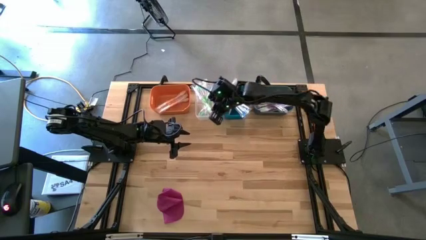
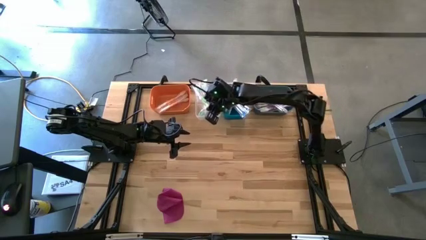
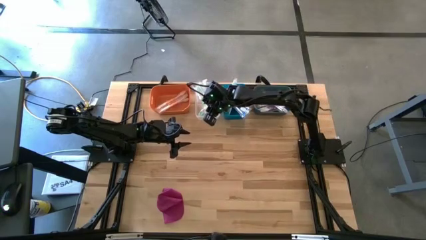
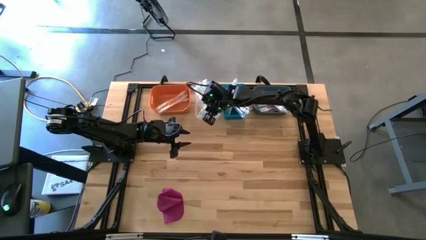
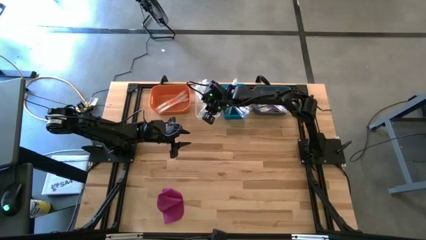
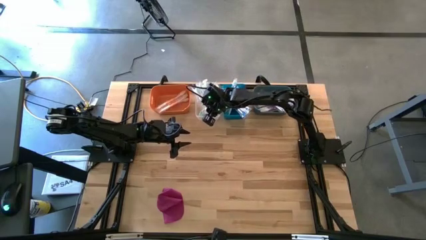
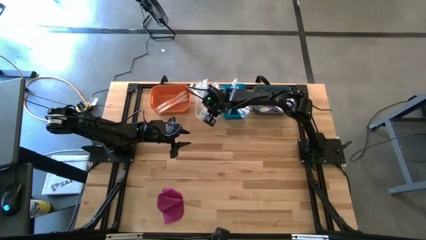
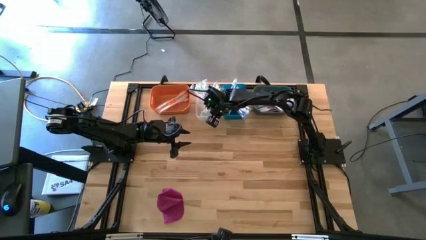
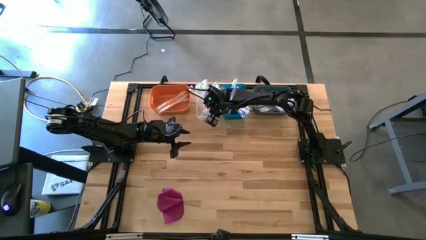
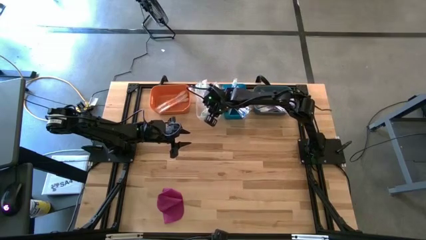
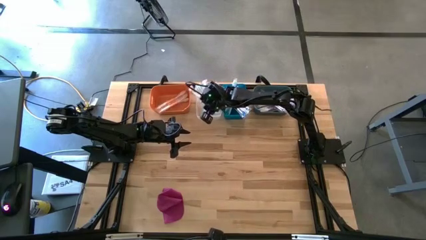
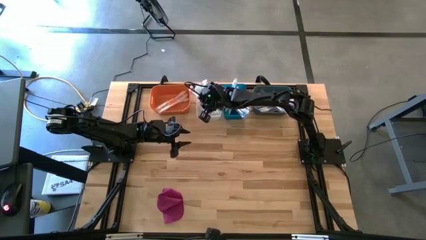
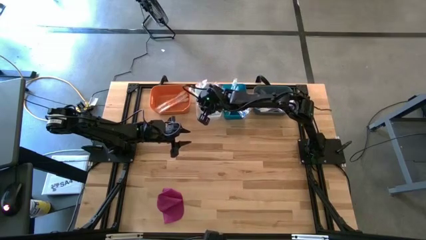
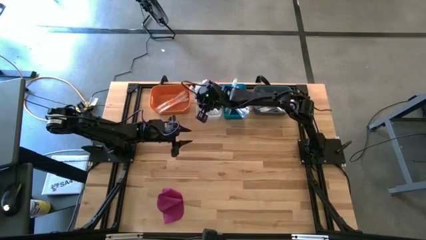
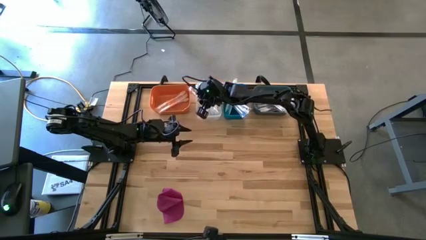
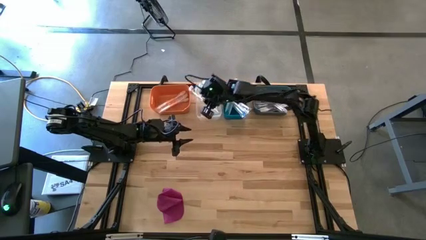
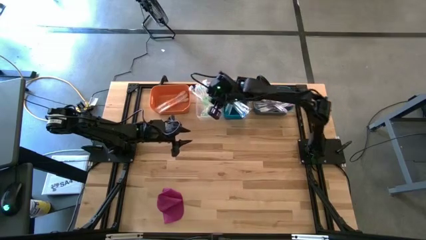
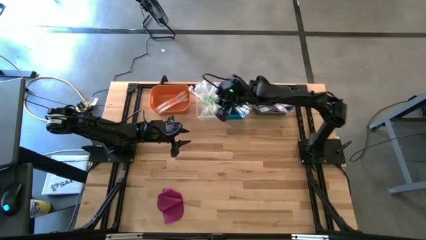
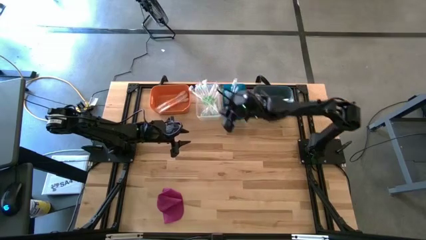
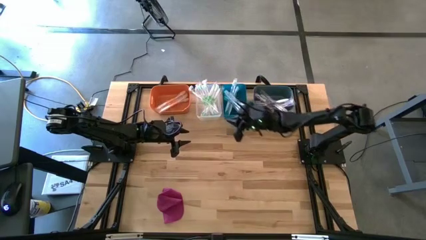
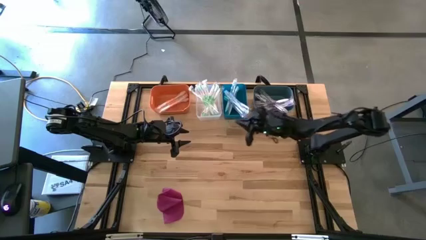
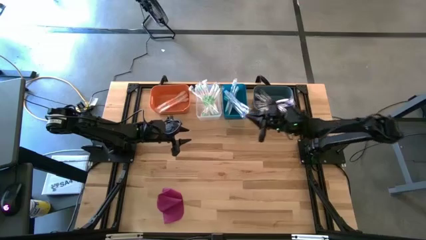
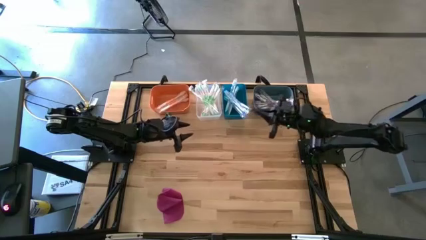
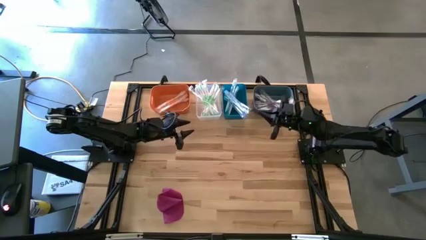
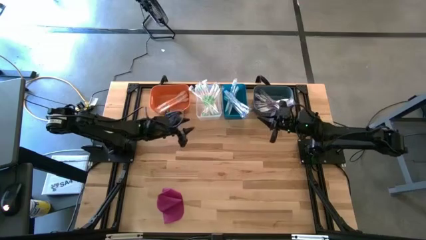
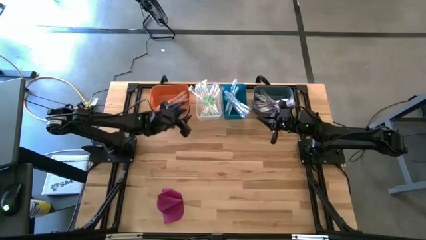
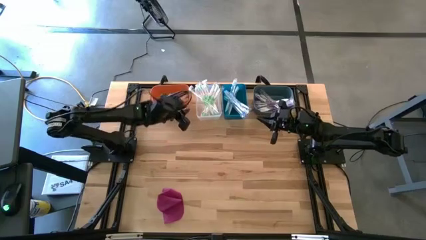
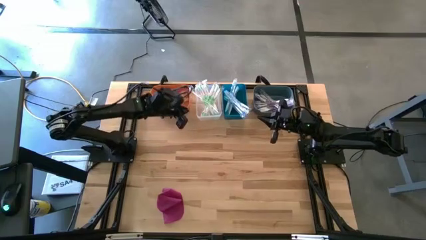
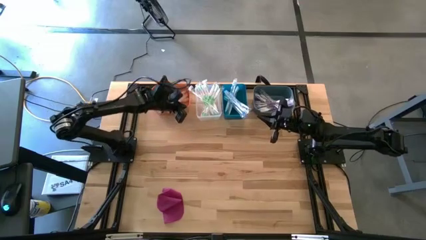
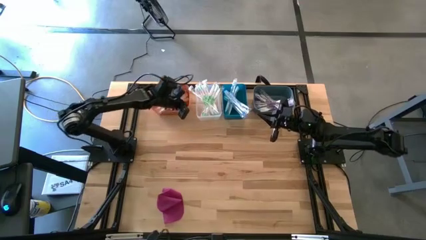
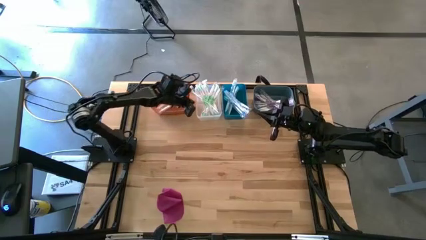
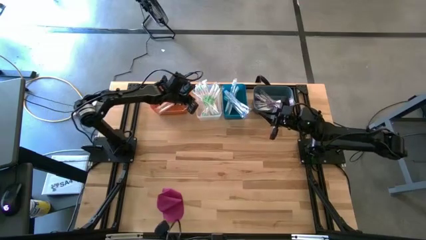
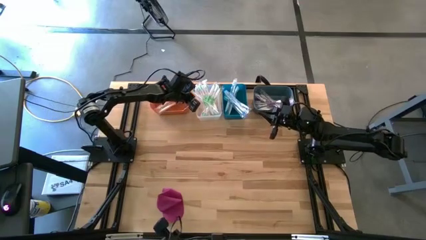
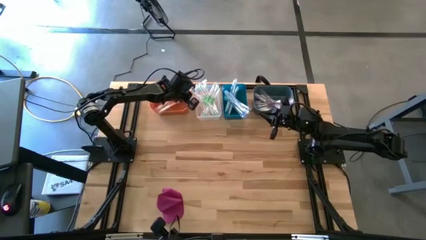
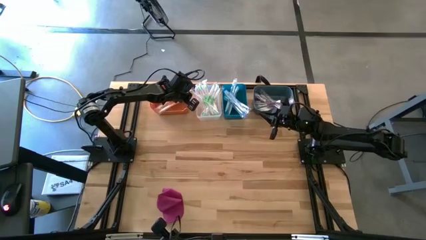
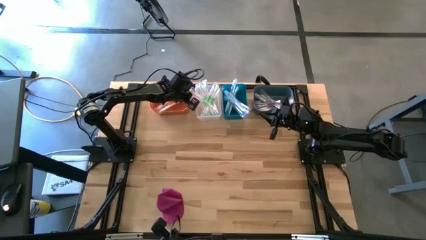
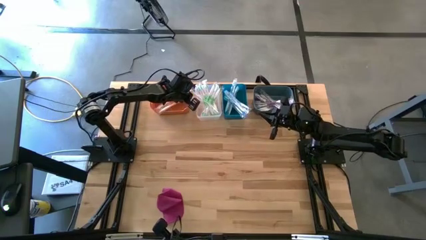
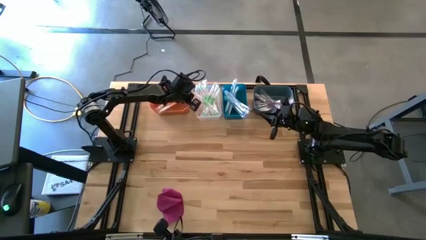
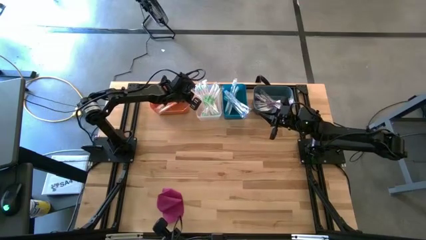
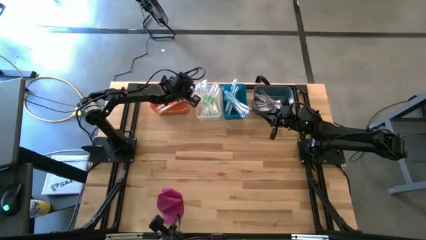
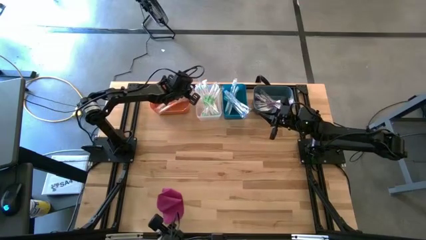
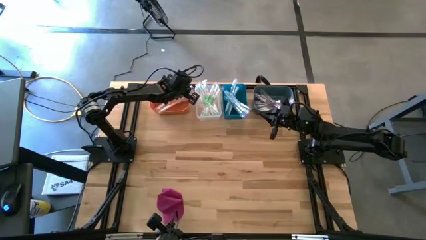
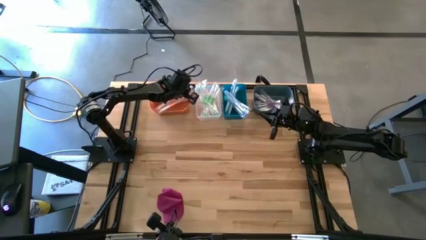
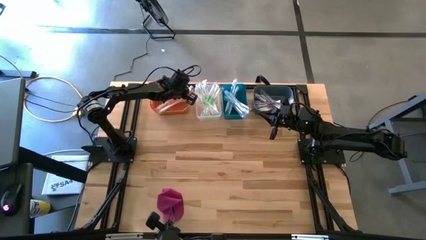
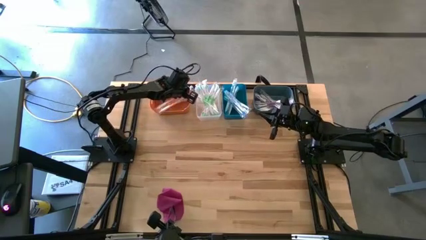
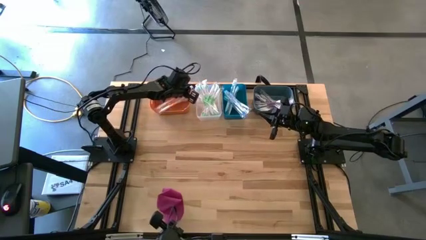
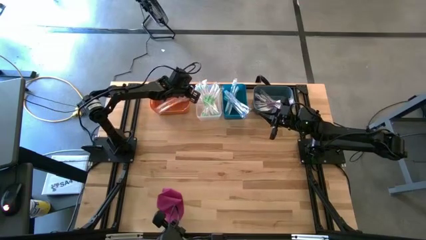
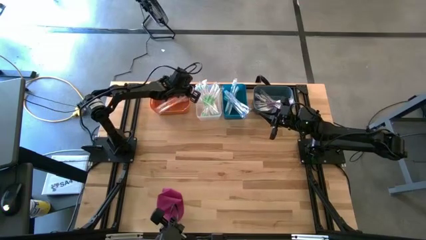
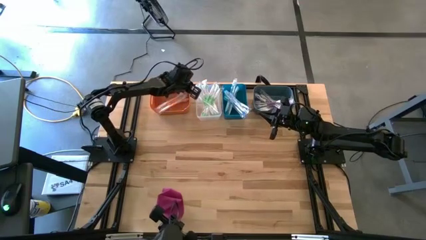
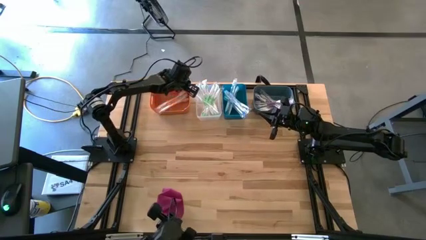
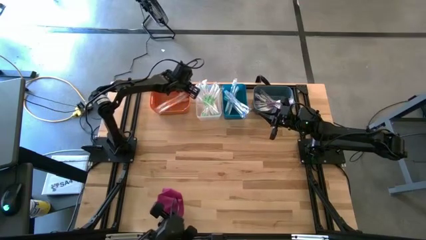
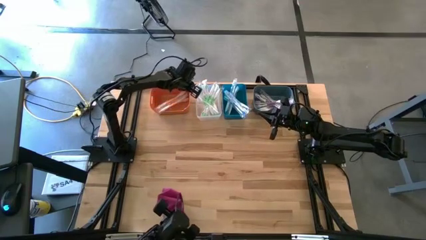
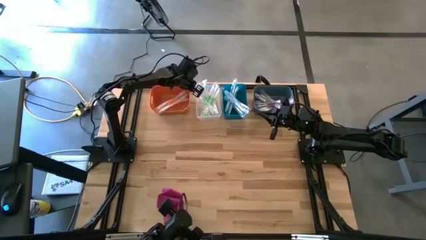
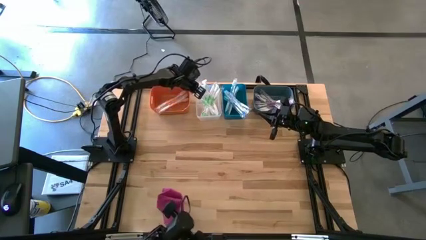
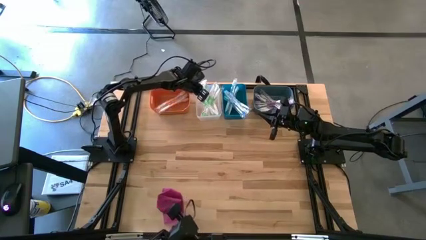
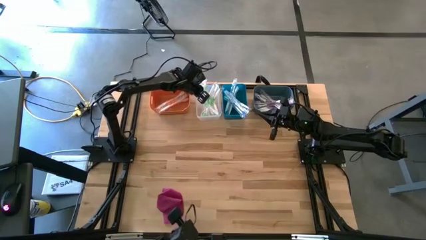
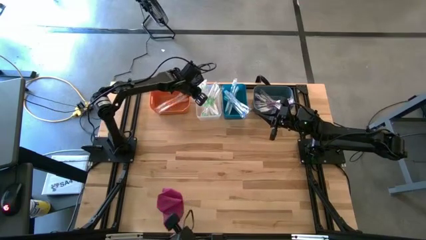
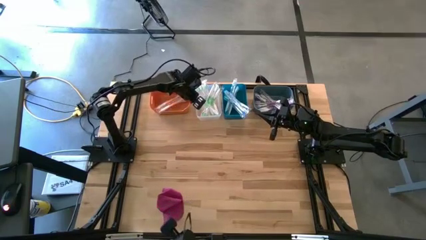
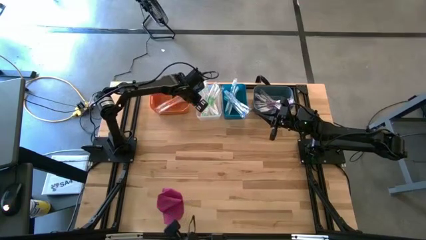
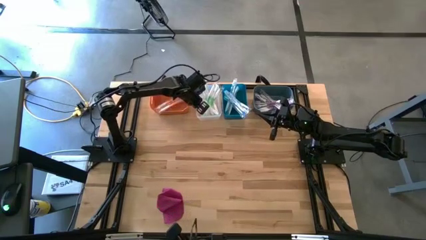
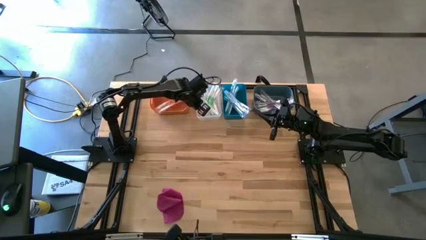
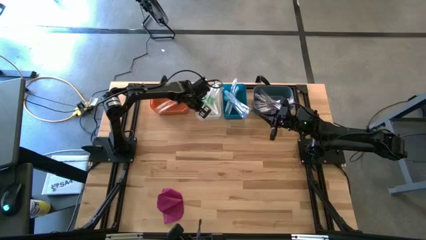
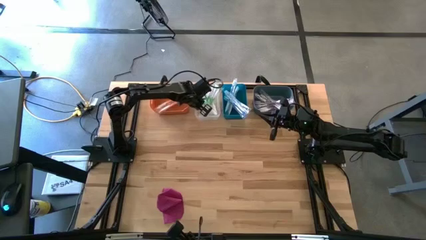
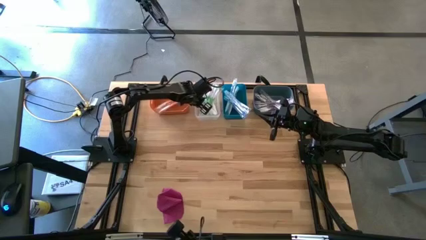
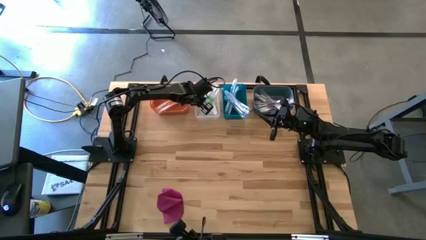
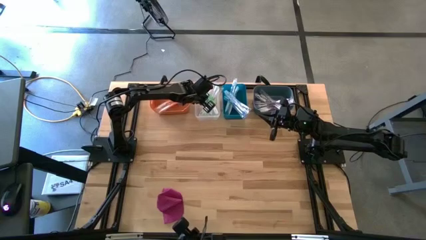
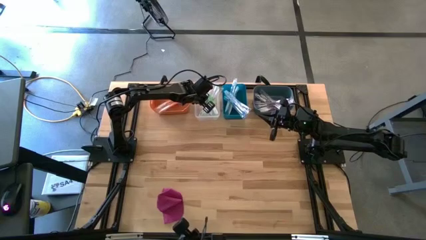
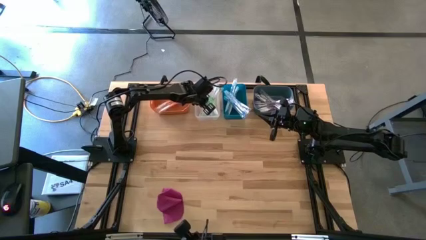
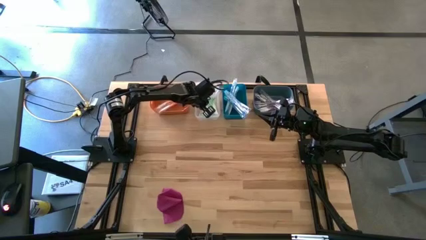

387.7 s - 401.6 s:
Task: Pick & Place Toothbrushes
Put the green toothbrush into the transparent bin
